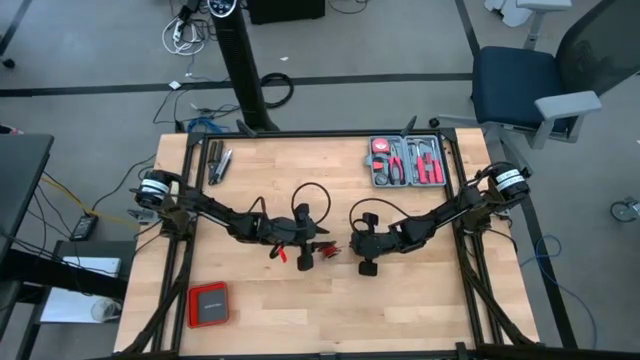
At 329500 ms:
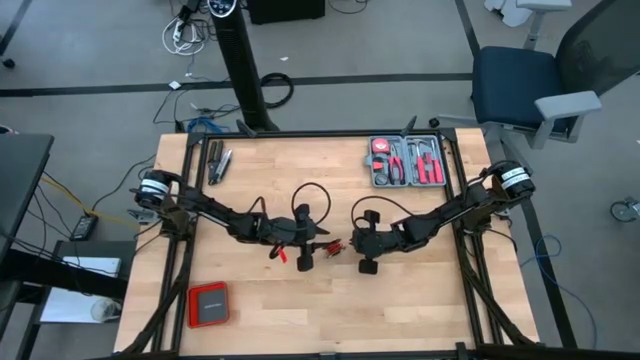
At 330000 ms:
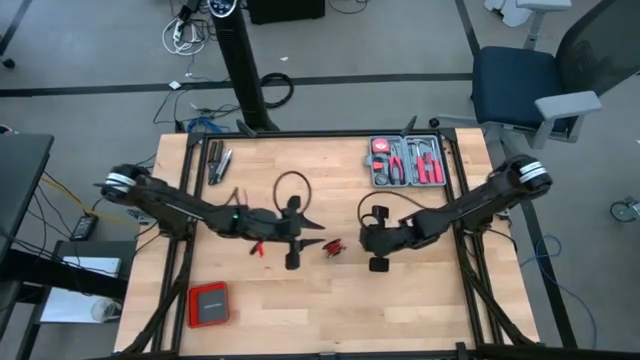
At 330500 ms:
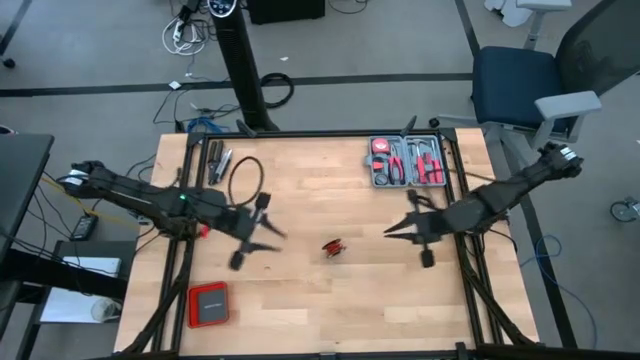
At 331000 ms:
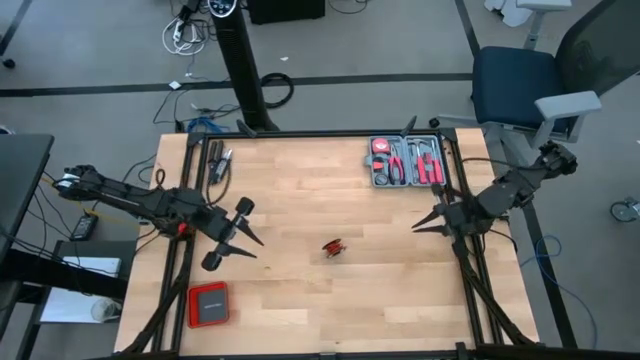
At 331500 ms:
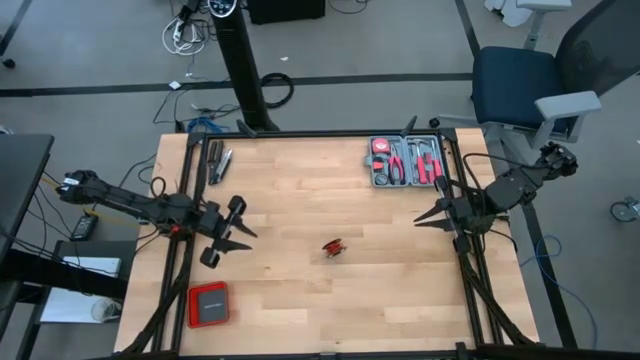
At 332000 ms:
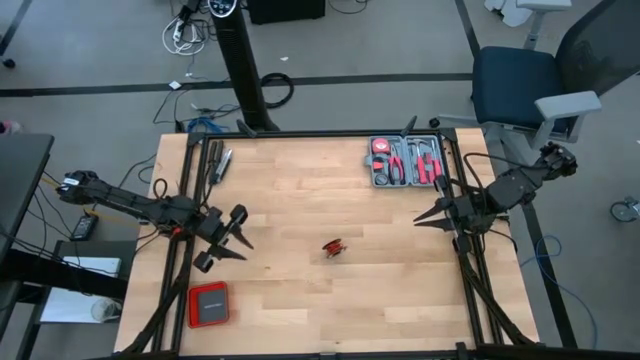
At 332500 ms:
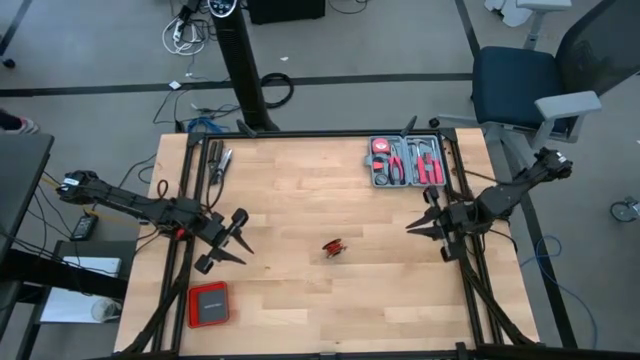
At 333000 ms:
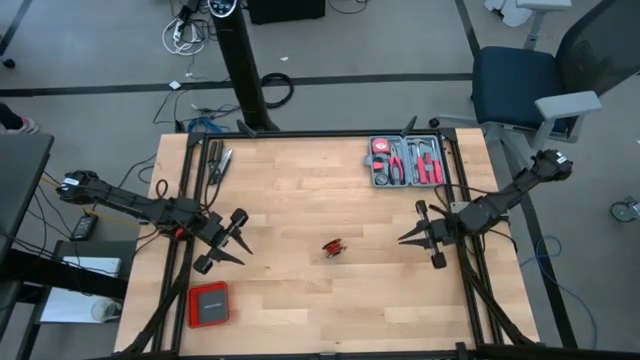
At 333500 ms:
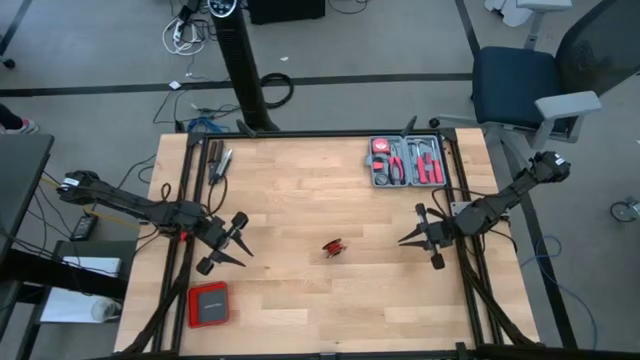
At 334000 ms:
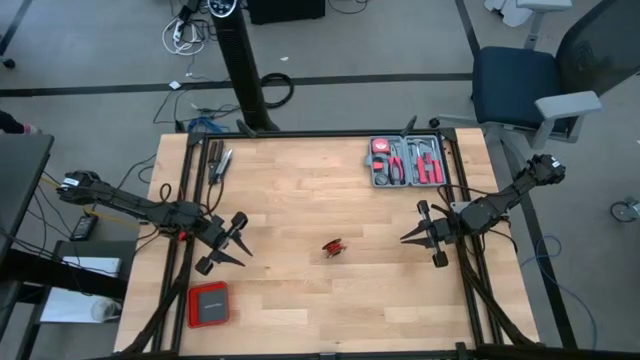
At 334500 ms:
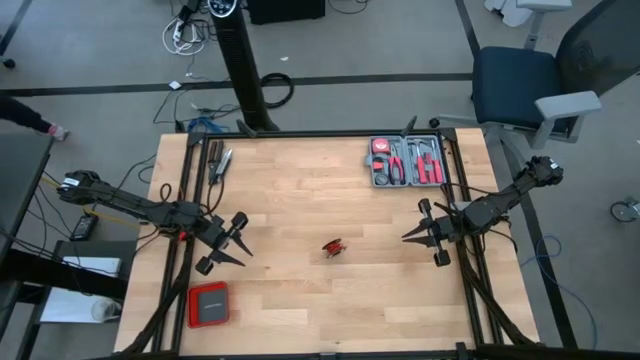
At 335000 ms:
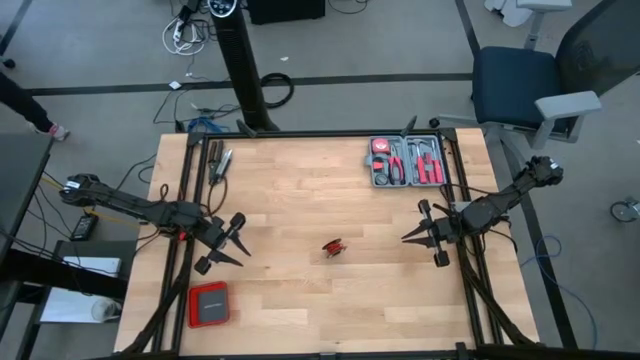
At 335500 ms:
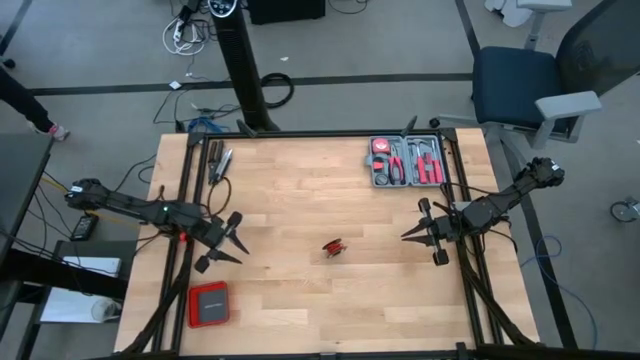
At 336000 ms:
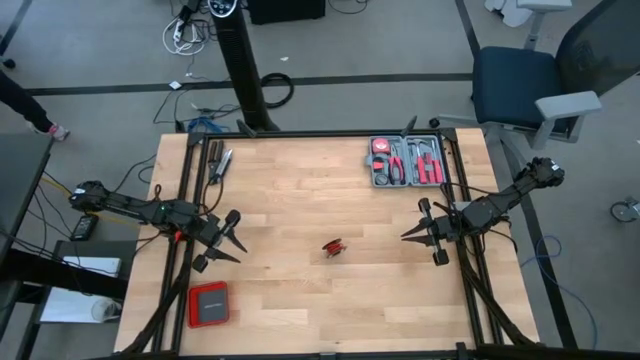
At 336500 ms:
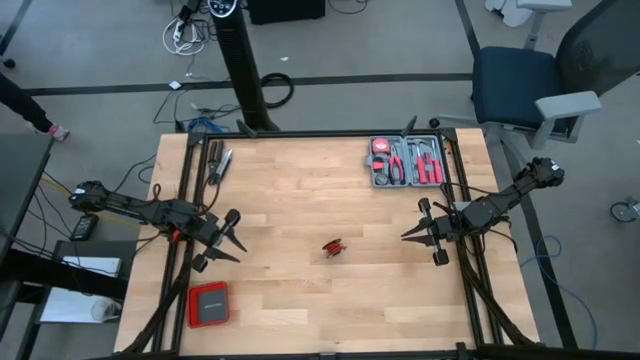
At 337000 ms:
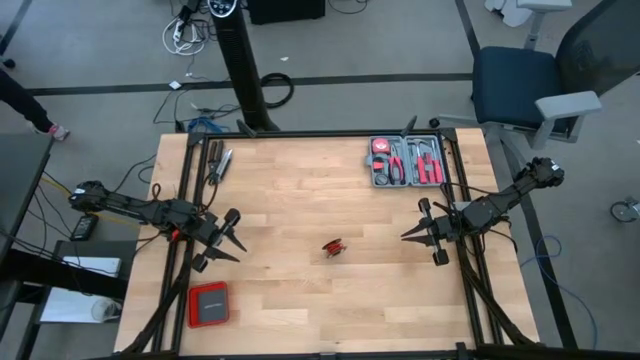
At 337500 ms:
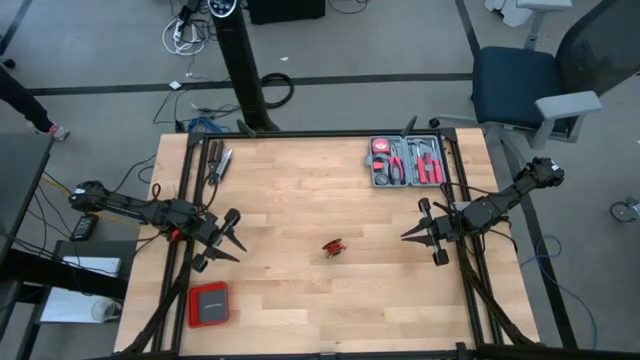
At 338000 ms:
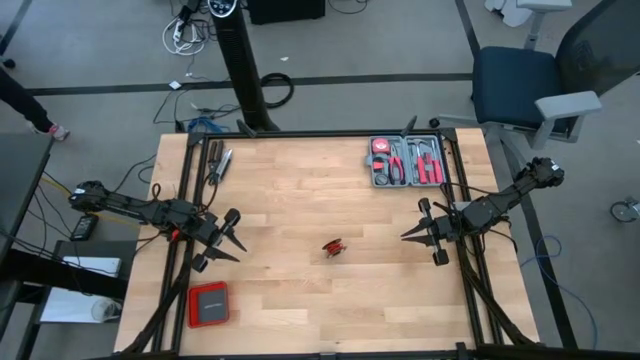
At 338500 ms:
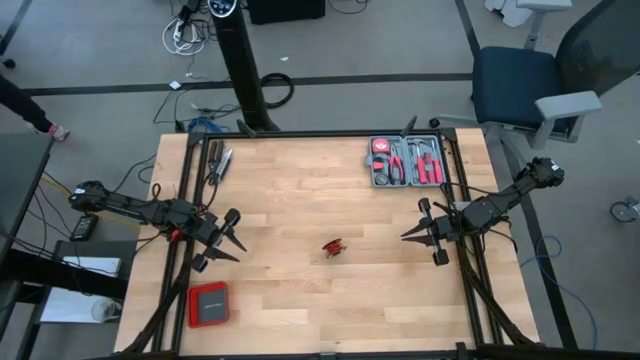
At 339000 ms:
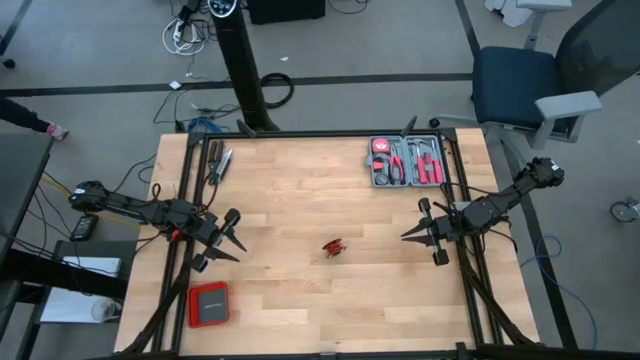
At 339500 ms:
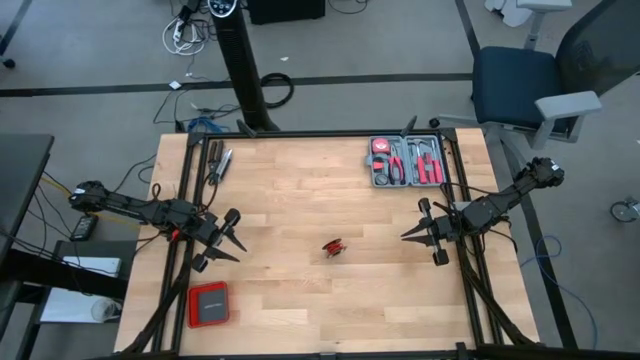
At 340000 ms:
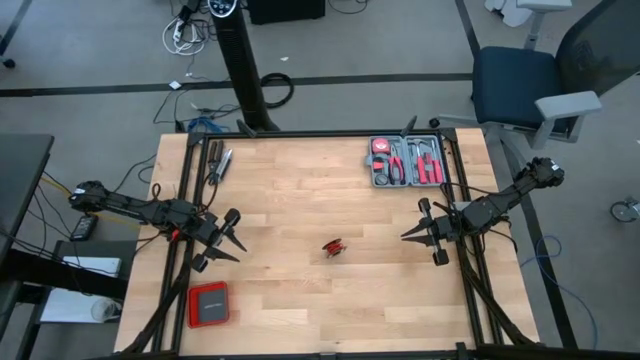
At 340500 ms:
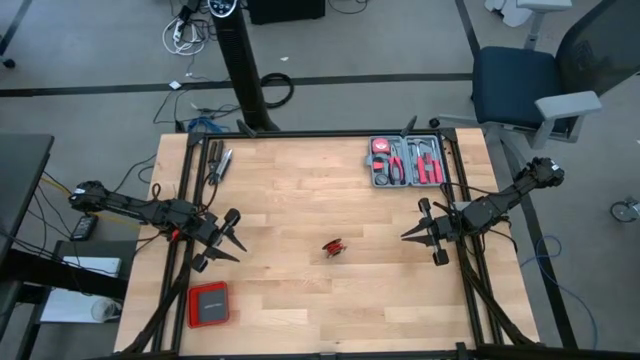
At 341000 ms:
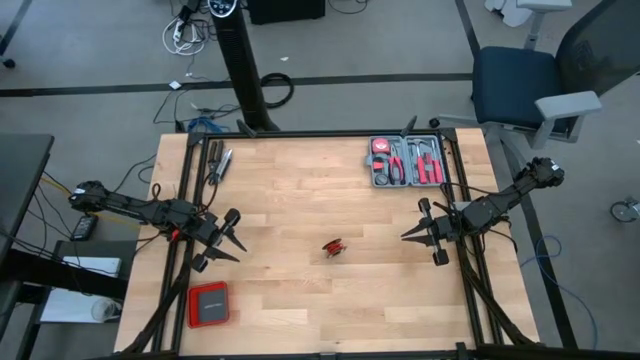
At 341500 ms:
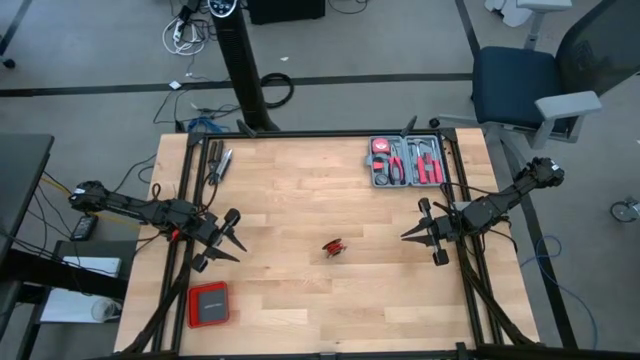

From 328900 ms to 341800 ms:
Task: Coil cords
Return to Home Position

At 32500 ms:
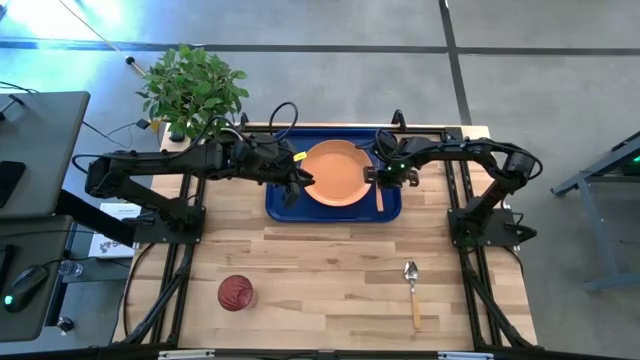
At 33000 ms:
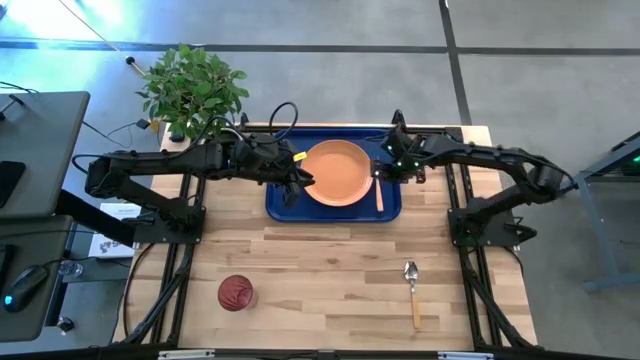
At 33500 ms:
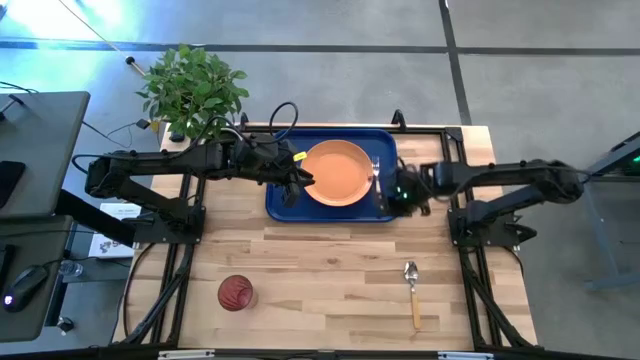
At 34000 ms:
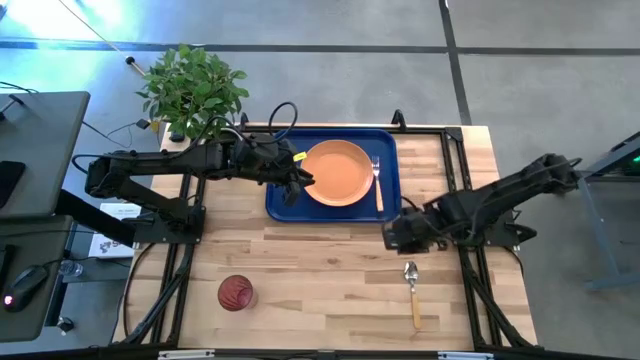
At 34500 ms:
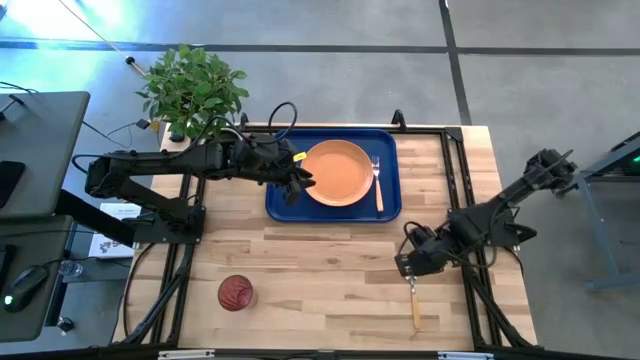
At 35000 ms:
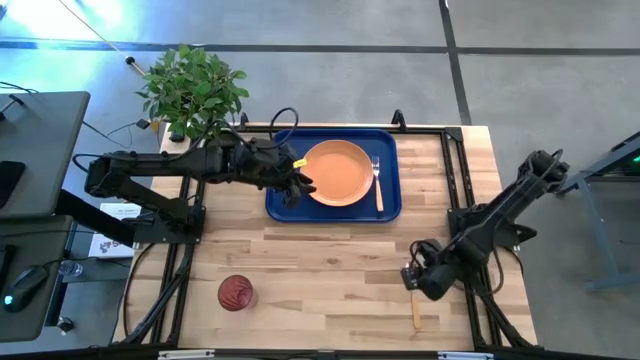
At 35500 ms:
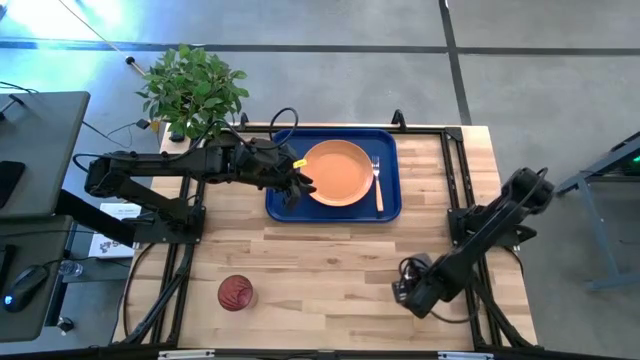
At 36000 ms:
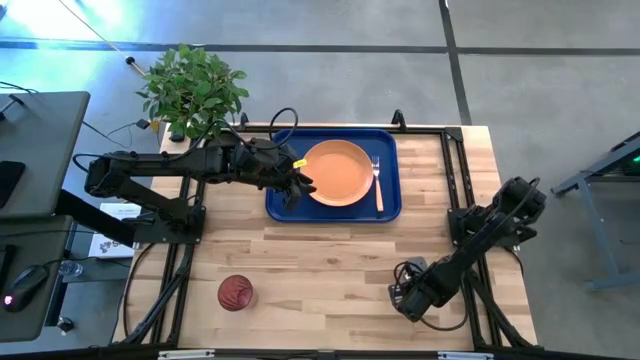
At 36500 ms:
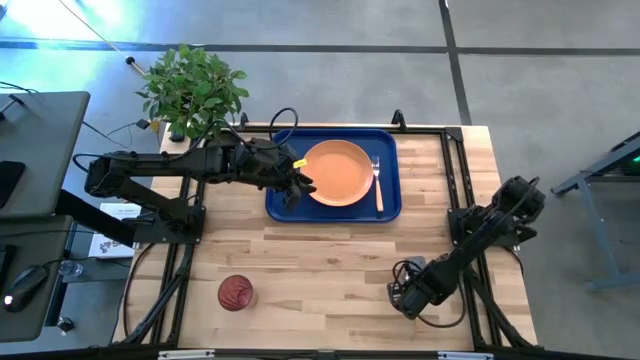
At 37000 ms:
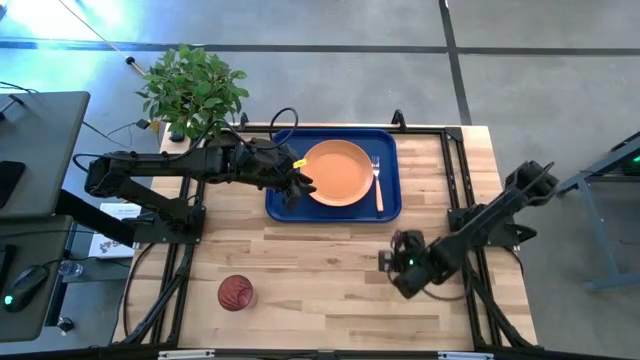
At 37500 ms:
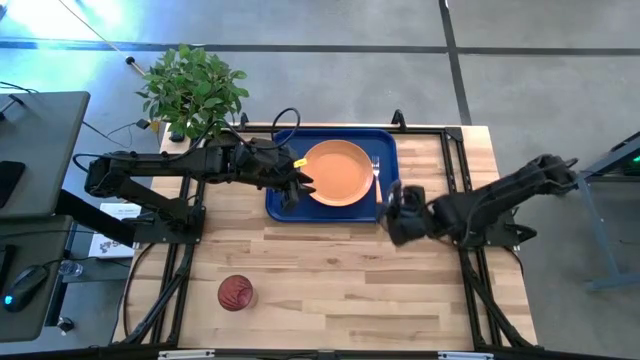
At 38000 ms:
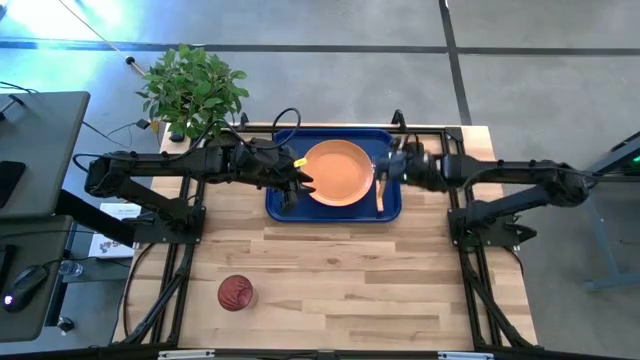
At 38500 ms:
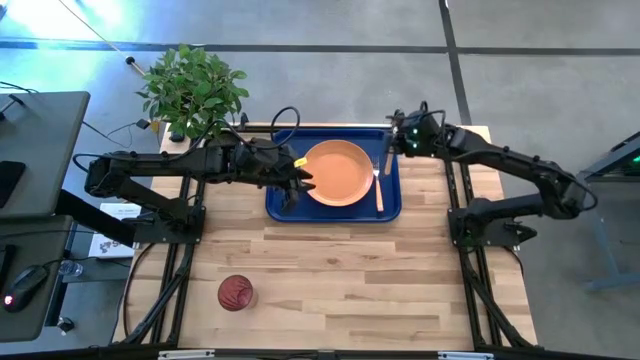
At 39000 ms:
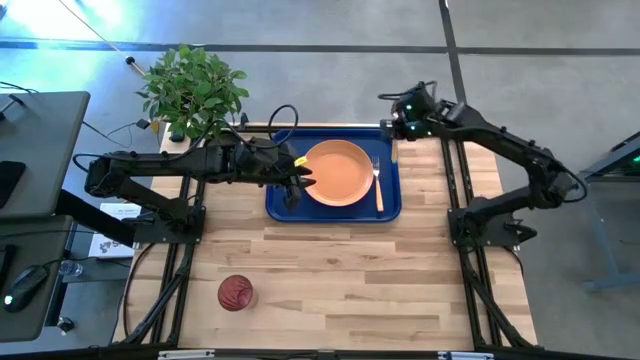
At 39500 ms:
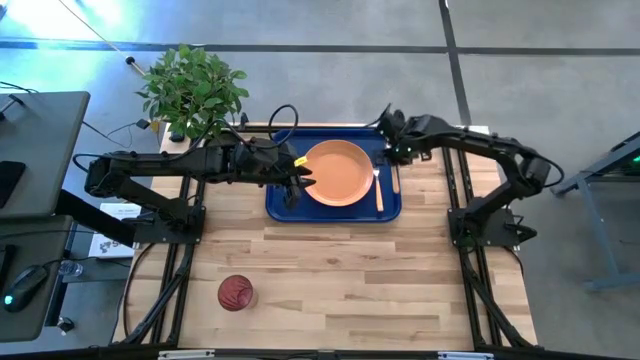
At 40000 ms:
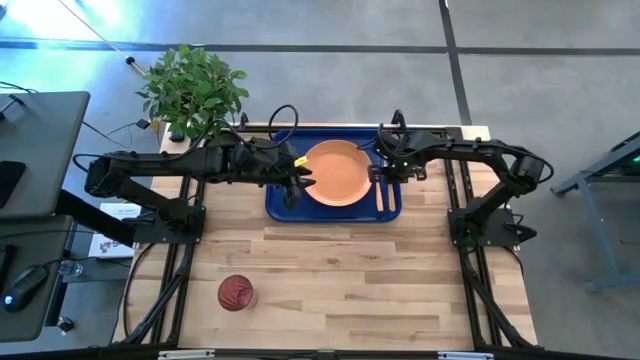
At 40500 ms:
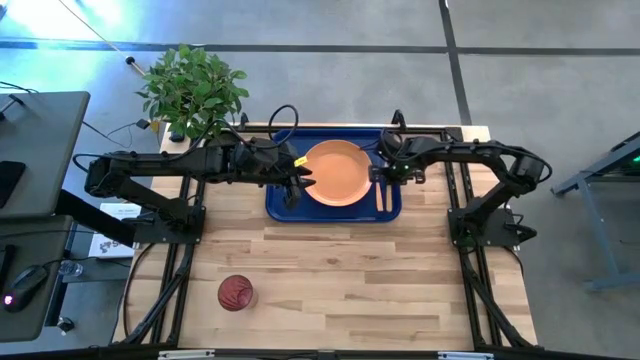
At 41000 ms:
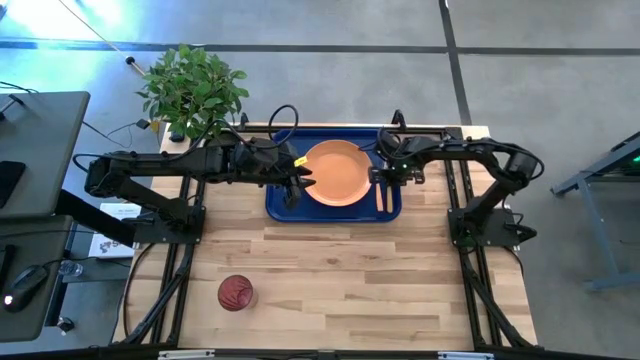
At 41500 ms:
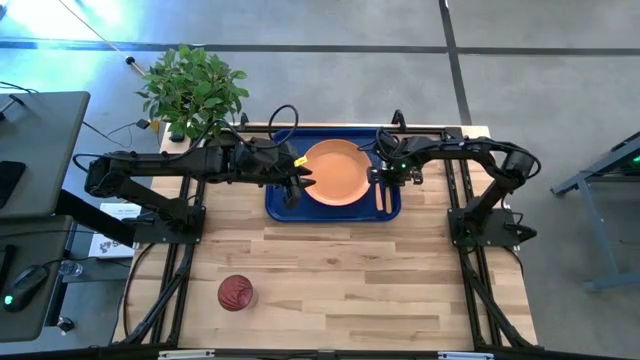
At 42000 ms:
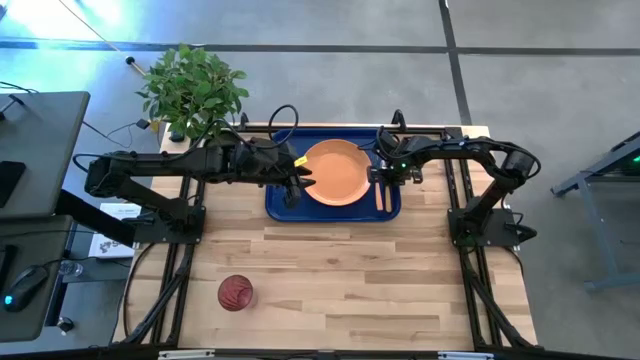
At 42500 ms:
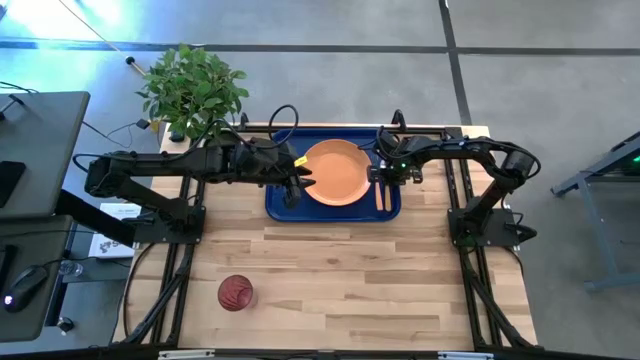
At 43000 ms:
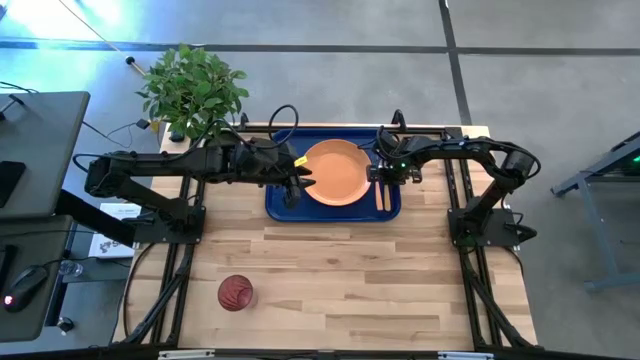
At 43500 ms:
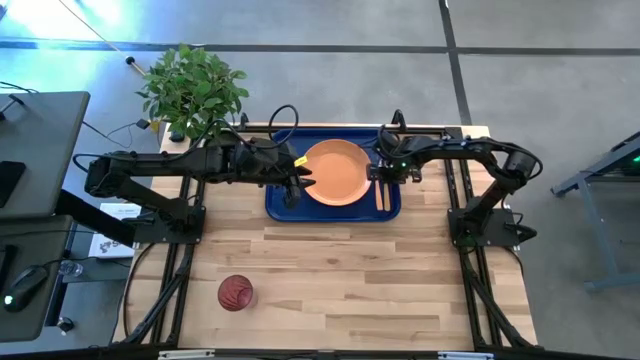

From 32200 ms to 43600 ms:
Task: Pick and place plate/cup/fork/spoon on tray
Put the yellow spoon on the blue tray
